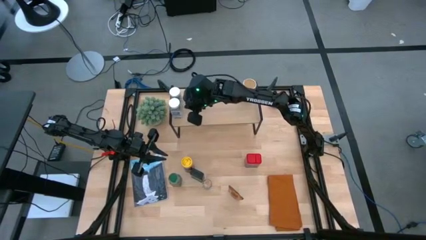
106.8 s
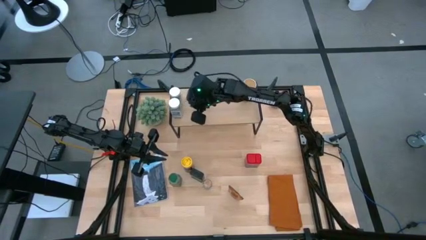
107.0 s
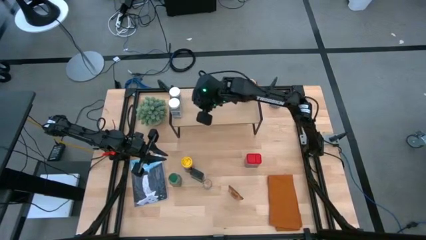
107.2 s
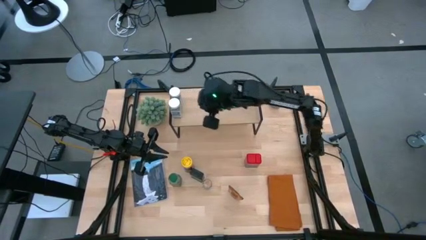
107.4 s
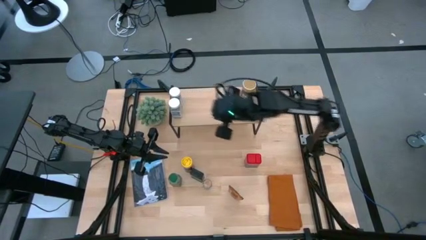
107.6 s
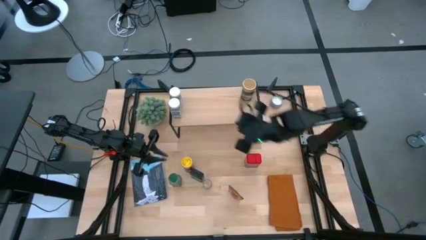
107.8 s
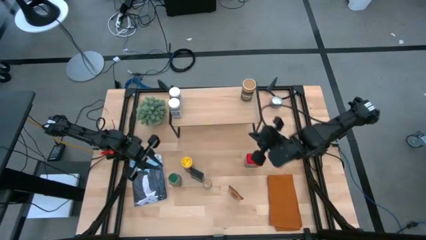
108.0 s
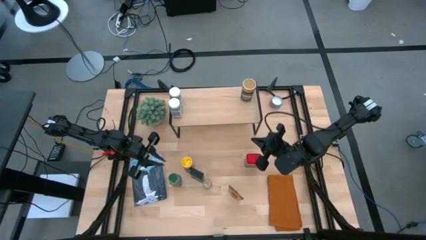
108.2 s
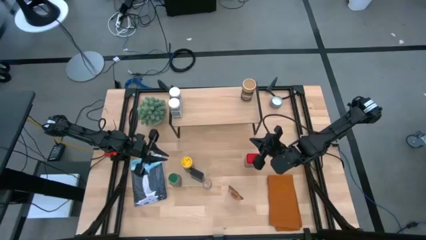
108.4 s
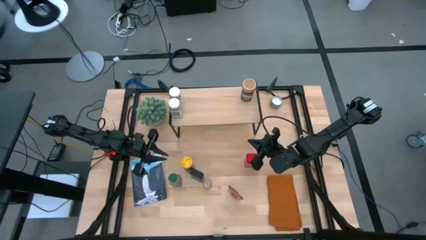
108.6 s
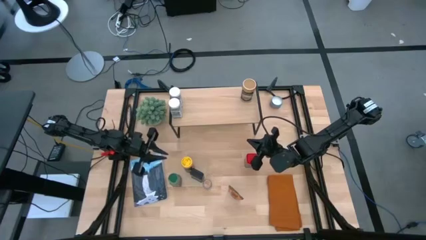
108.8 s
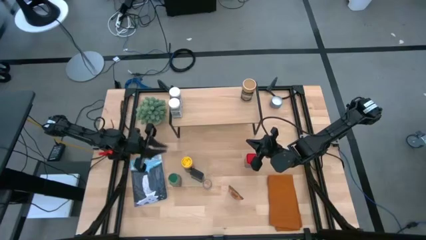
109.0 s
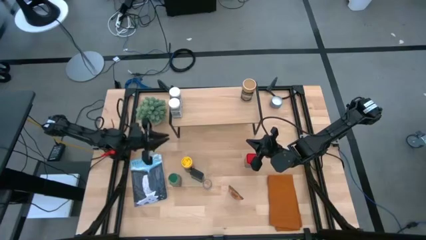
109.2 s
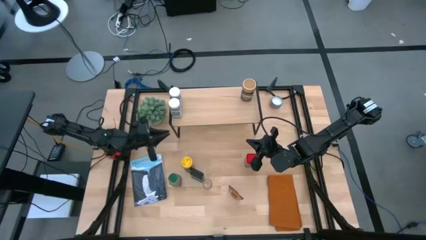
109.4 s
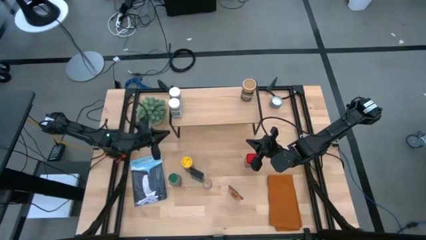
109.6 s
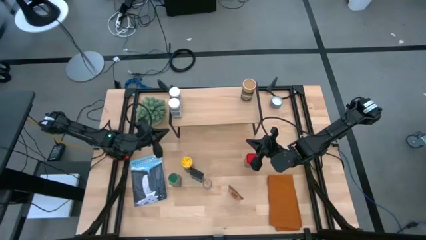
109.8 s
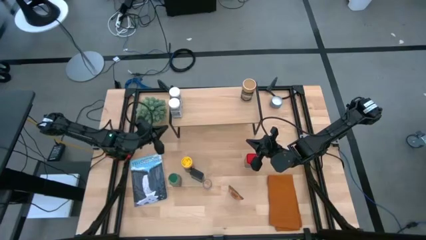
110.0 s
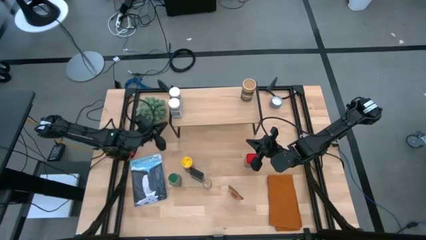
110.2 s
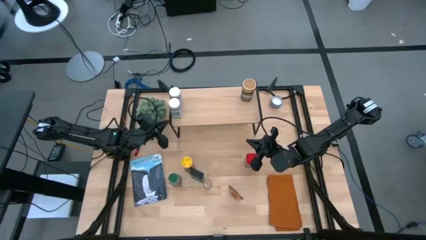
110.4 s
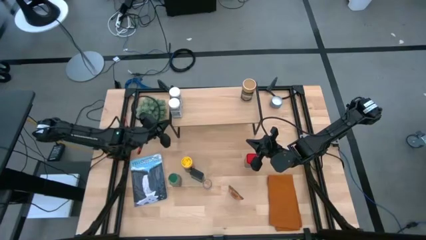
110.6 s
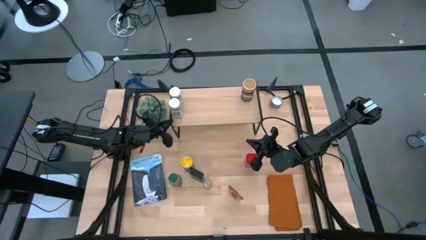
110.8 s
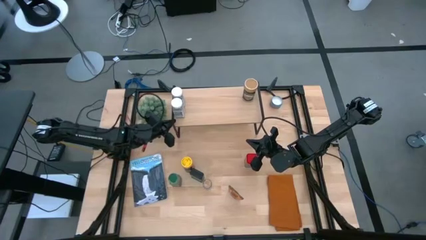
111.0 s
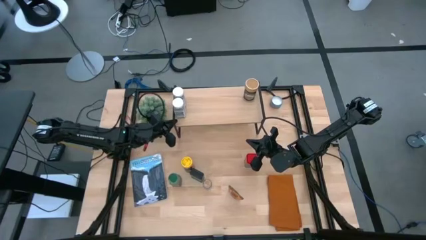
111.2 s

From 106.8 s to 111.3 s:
Task: Shelf spices
Adjust the shelf on the table

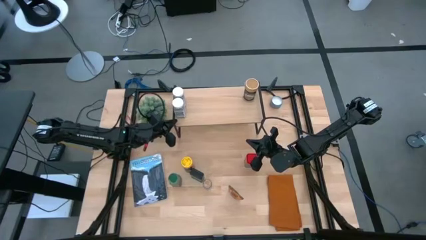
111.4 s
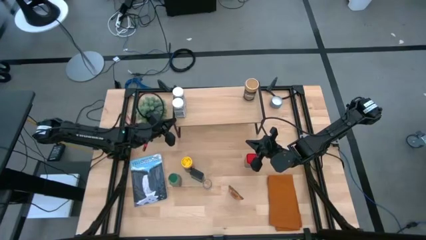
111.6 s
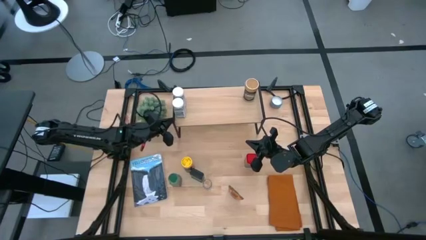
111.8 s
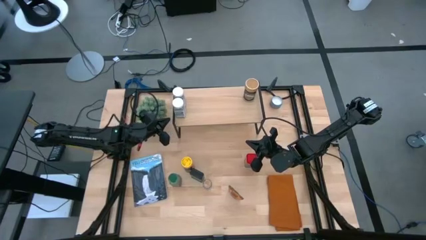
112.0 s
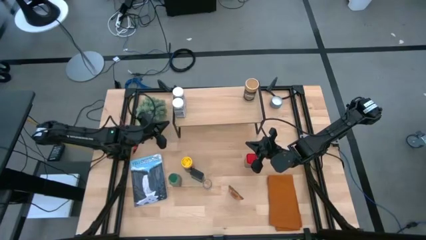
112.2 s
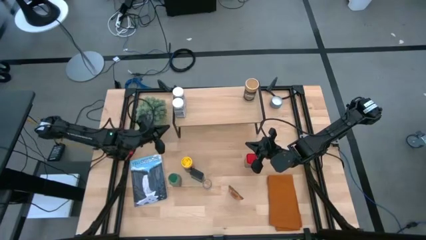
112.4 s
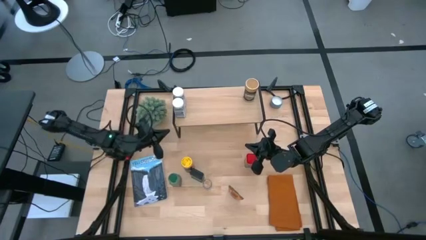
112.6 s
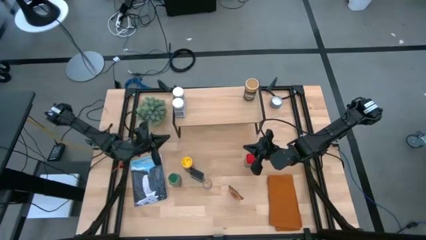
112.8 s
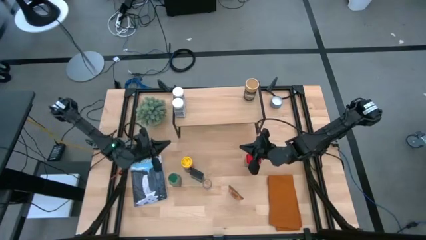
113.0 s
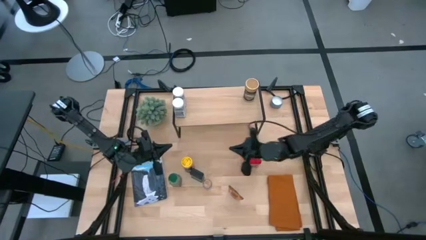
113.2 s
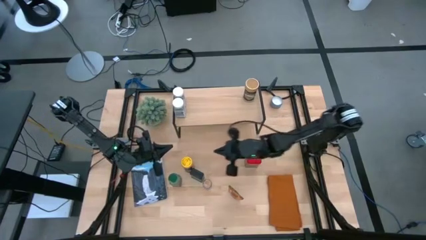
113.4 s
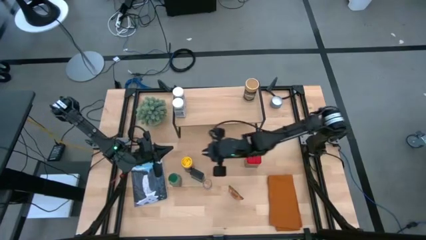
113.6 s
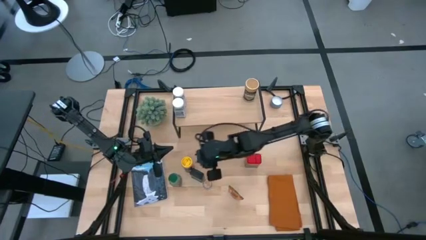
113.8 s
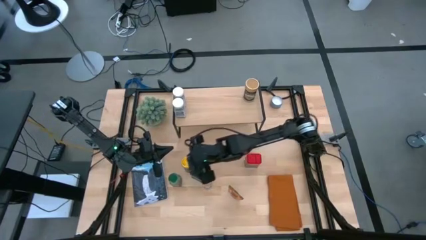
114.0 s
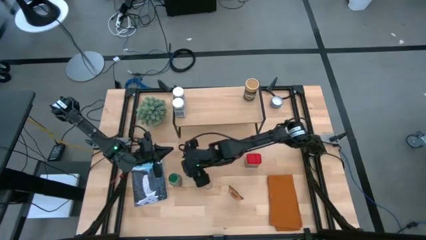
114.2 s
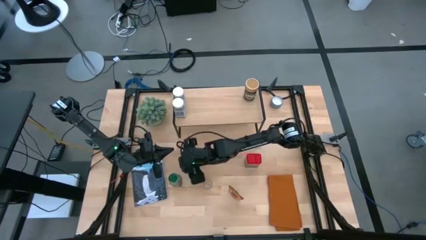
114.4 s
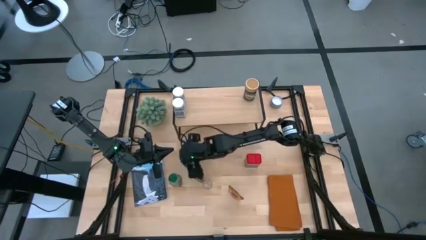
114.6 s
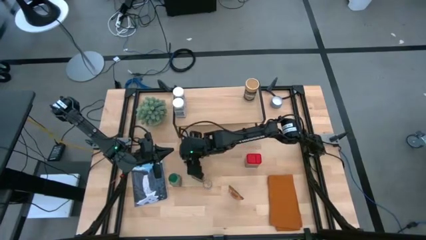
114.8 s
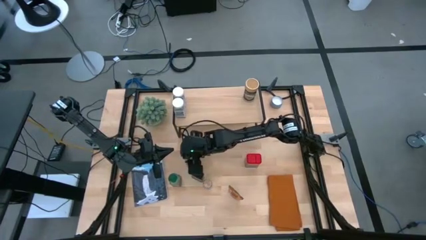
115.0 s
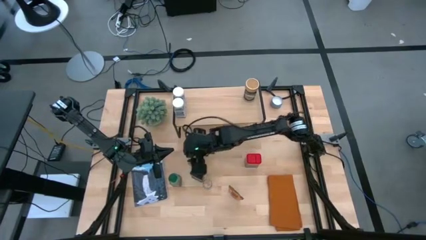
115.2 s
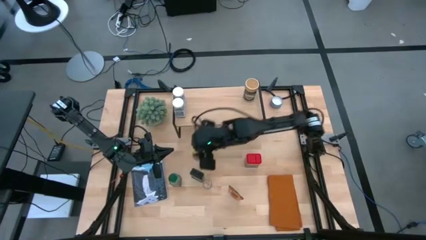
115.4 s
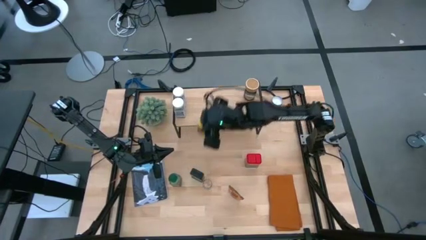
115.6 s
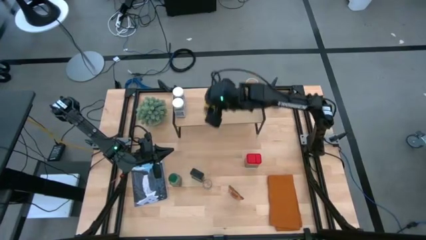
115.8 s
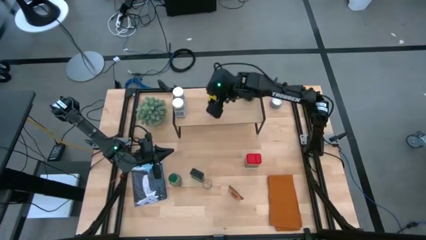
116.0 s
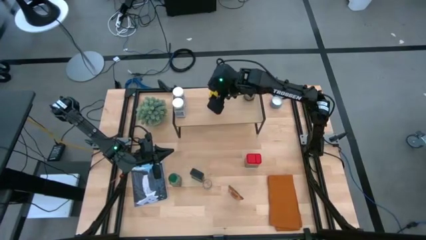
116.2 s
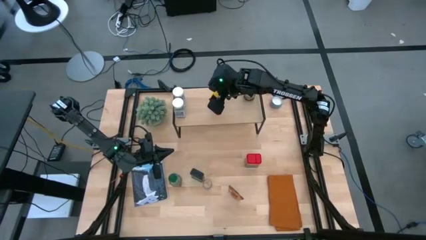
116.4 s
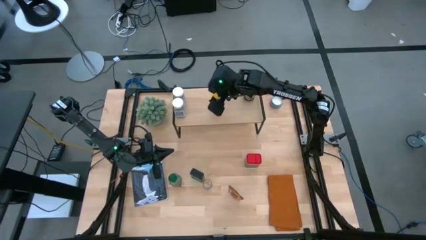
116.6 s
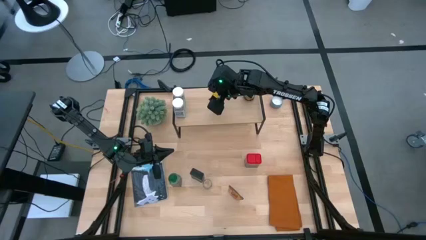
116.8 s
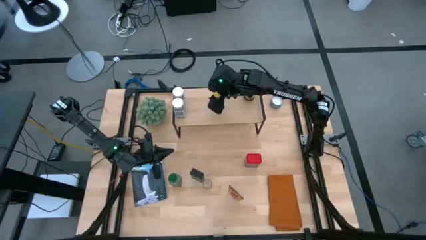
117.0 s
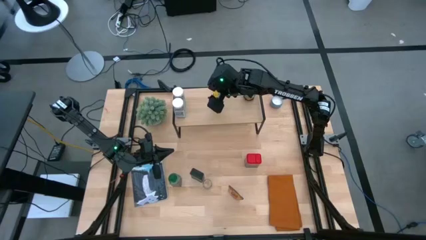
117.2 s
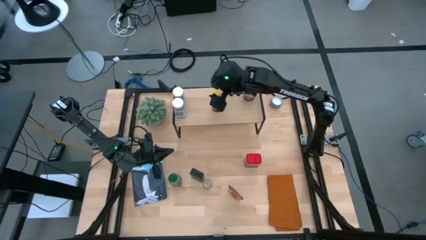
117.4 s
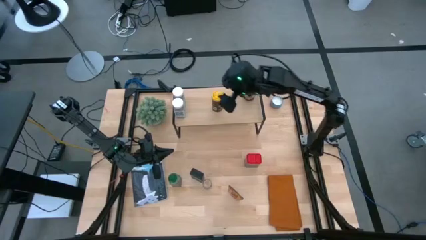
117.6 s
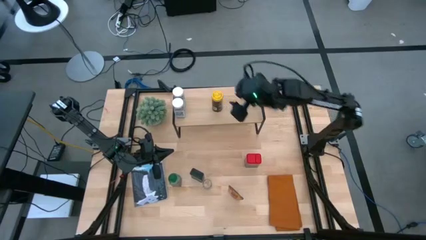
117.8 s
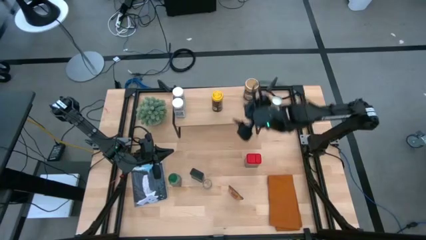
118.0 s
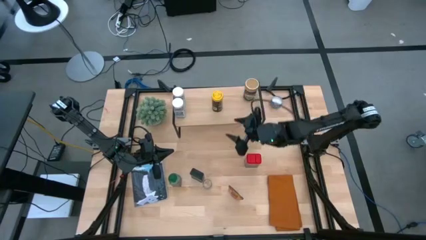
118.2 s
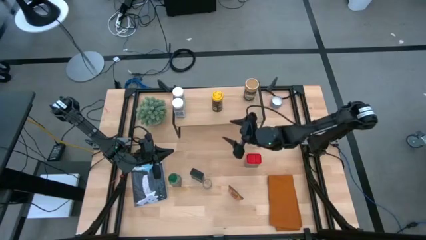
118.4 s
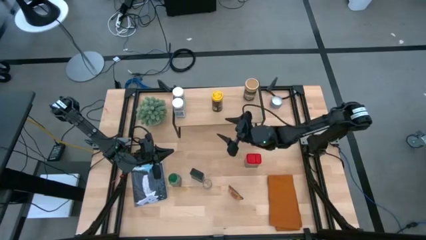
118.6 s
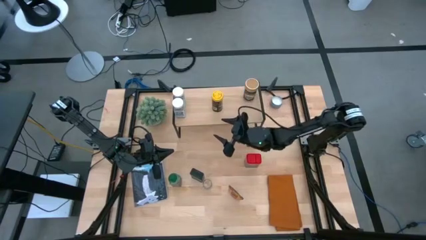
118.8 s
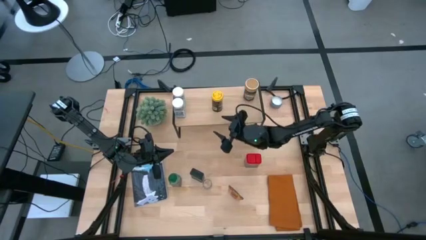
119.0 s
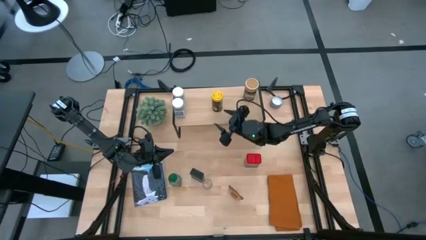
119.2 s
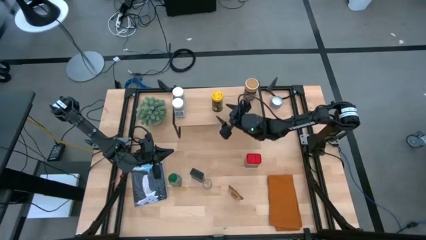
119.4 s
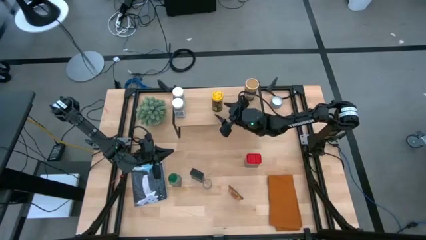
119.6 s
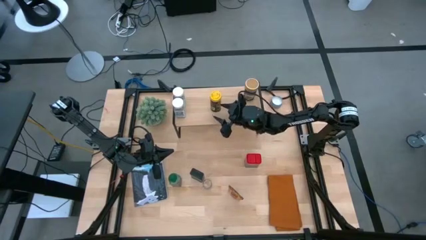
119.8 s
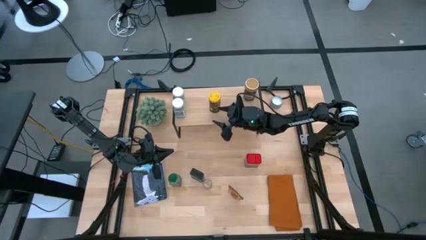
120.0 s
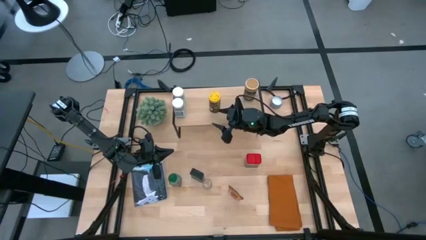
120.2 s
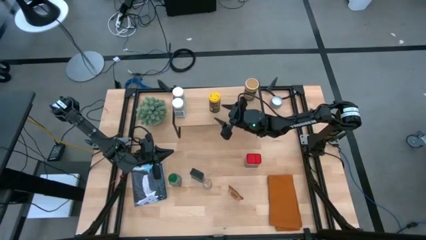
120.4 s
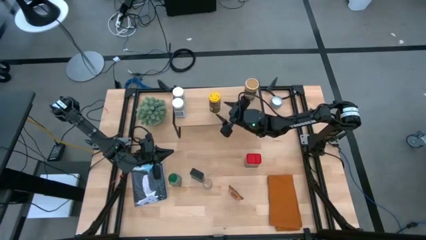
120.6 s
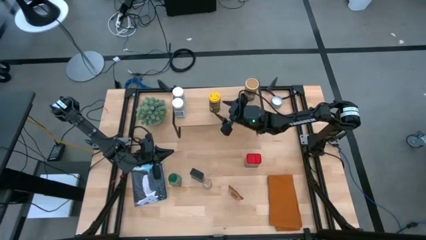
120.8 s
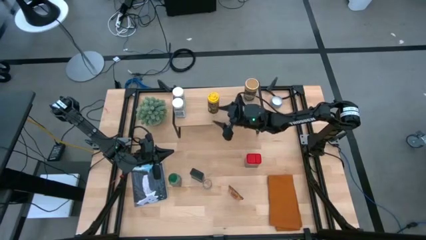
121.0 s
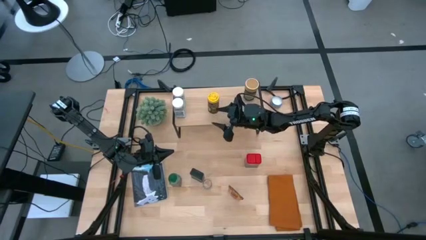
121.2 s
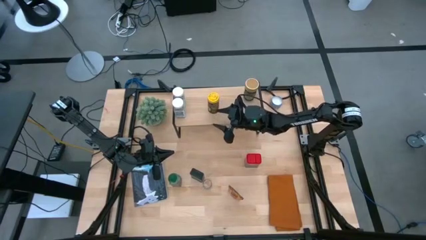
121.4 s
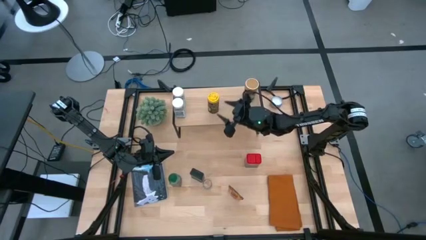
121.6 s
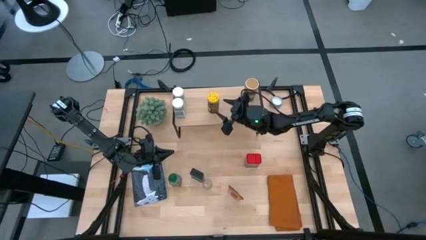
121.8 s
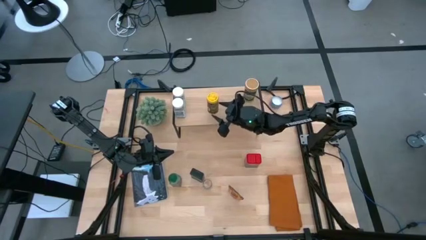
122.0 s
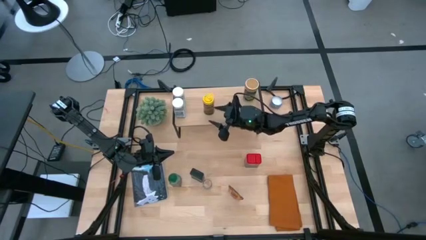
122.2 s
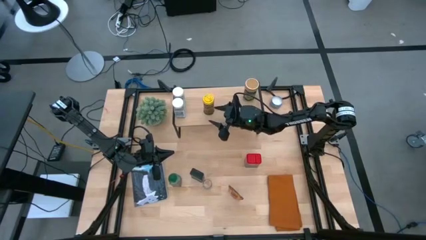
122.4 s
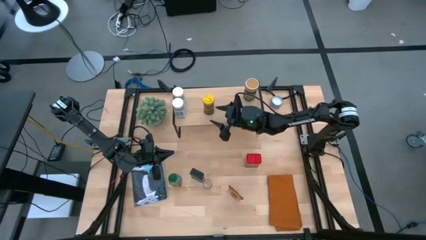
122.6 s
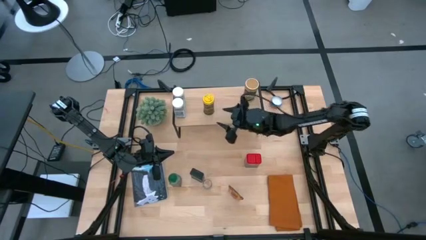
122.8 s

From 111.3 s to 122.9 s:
Put the yellow seasoning bottle on the shelf

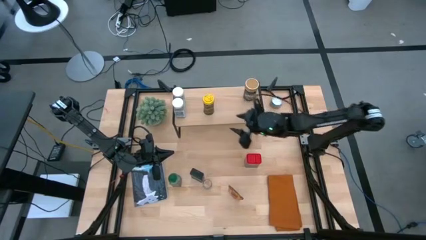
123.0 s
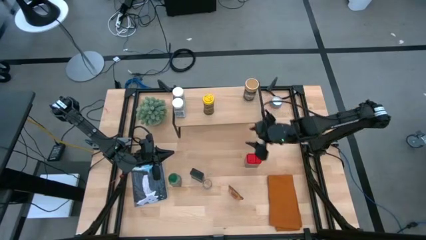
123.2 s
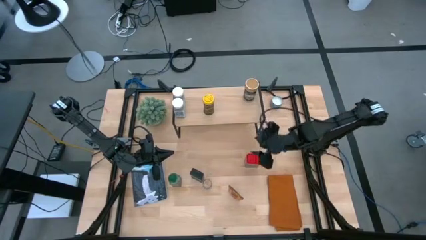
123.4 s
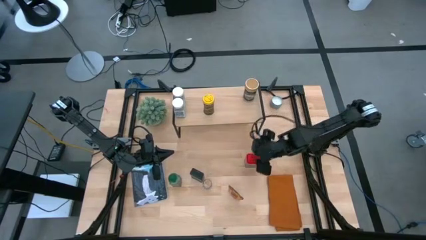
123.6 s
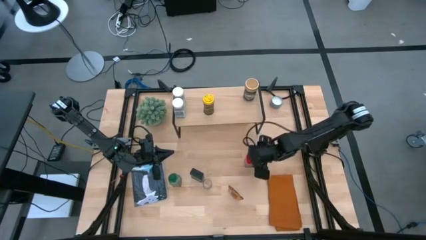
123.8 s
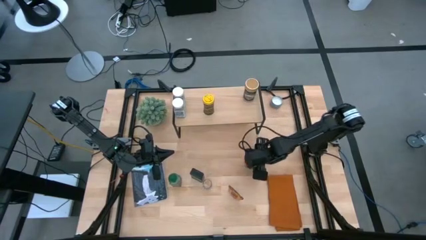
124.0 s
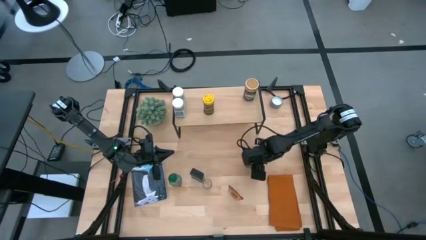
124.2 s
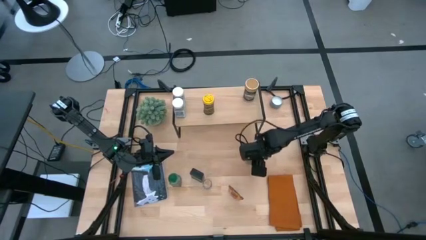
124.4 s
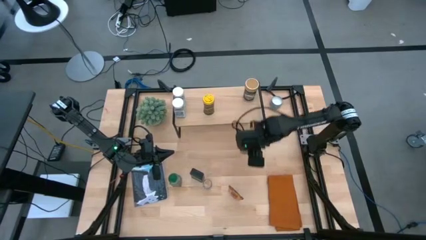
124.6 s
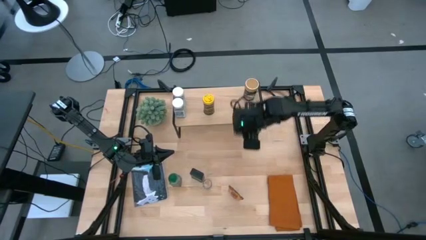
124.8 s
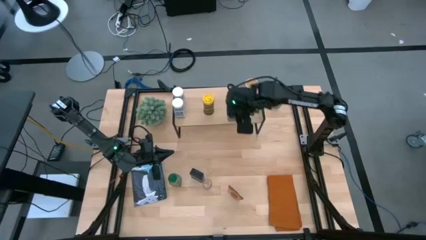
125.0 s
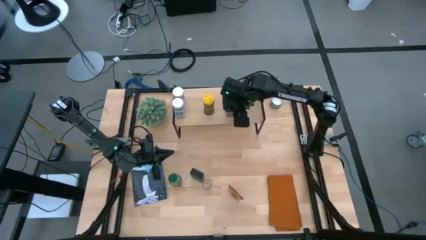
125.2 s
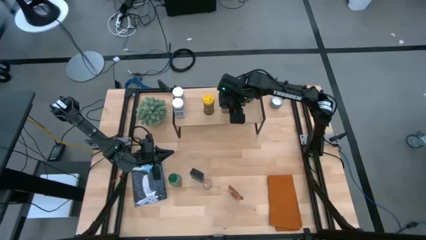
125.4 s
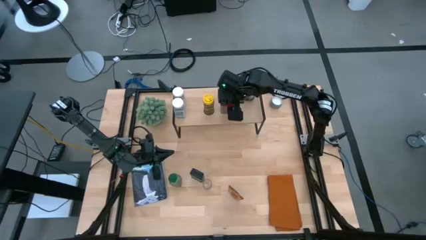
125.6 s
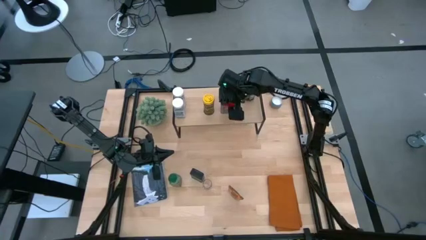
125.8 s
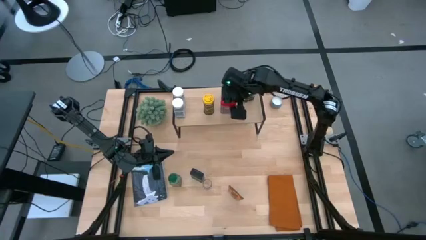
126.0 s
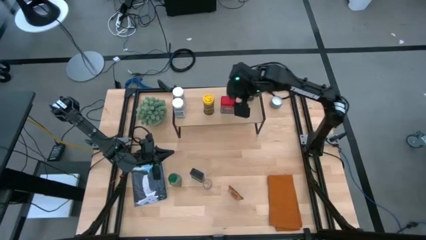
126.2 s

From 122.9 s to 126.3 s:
Put the red seasoning can on the shelf
